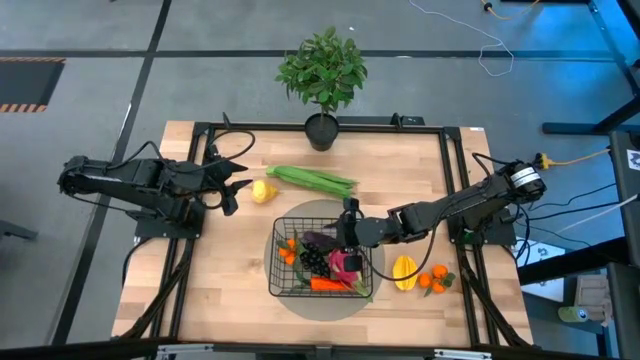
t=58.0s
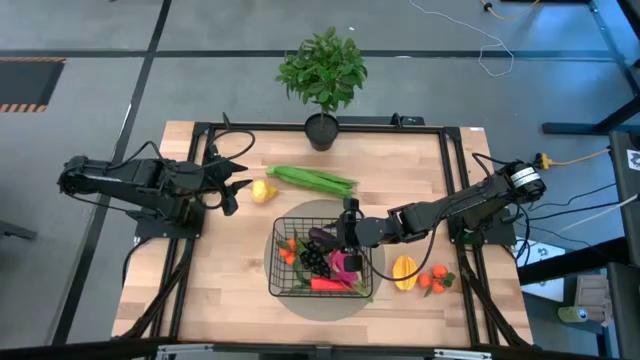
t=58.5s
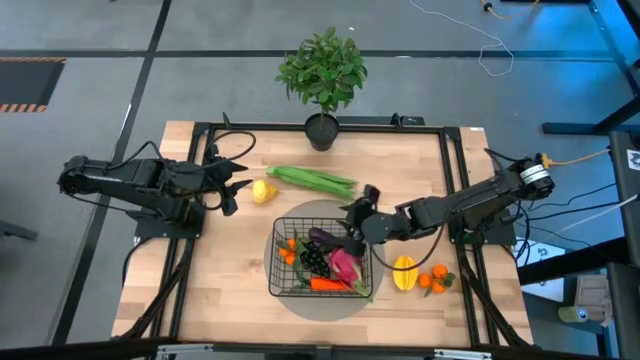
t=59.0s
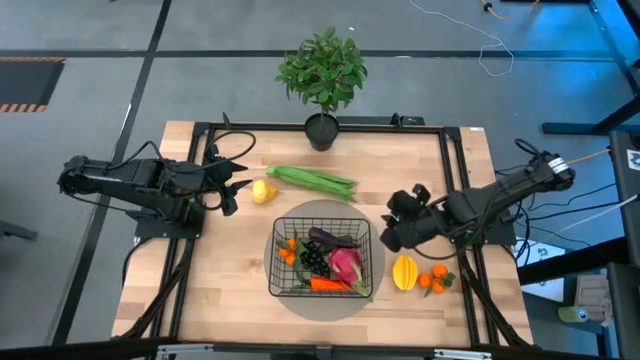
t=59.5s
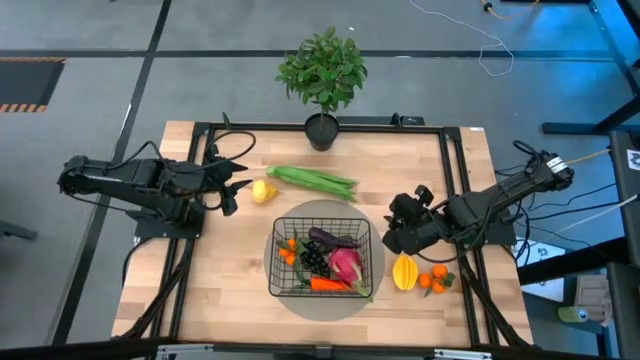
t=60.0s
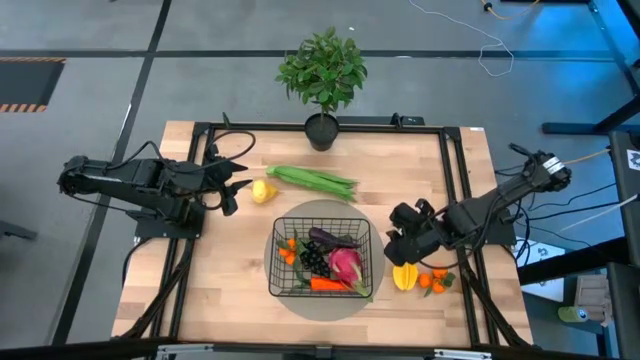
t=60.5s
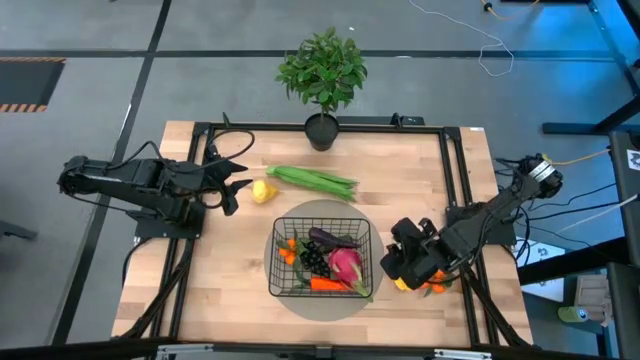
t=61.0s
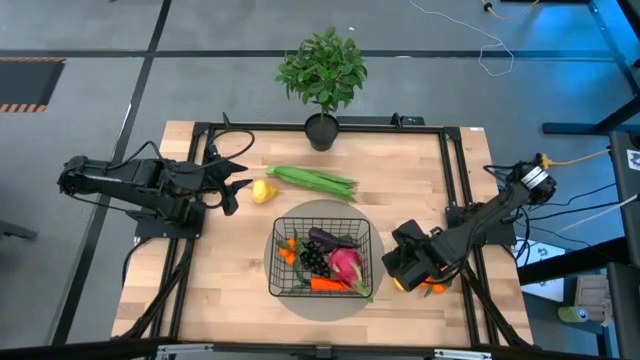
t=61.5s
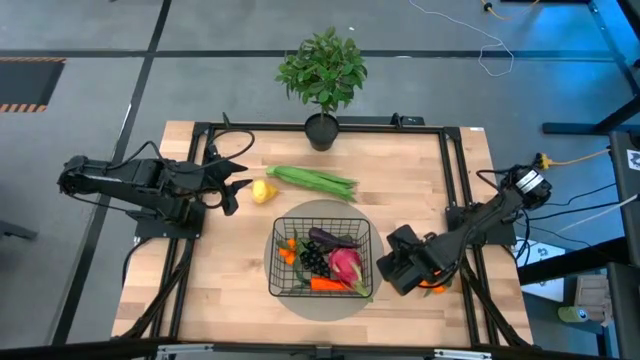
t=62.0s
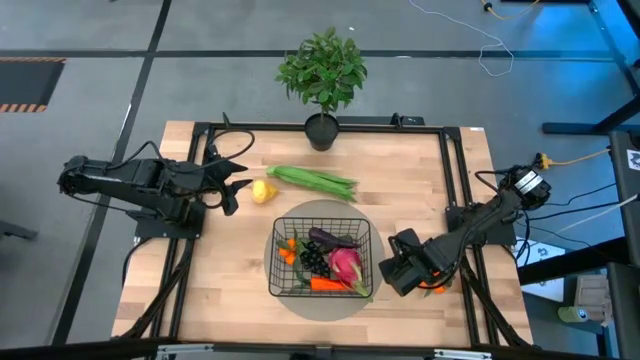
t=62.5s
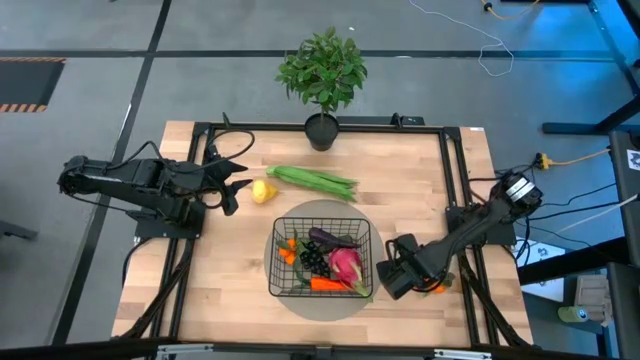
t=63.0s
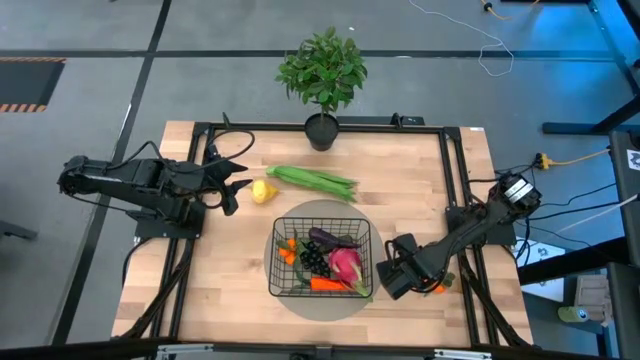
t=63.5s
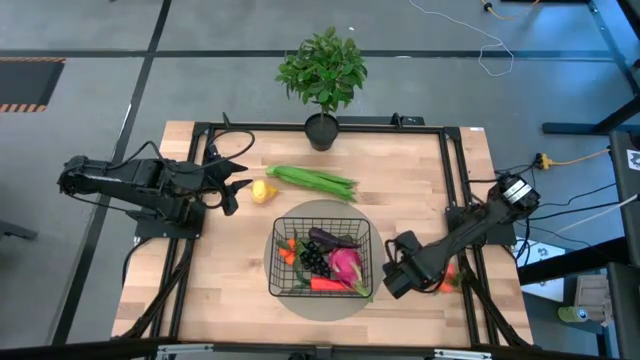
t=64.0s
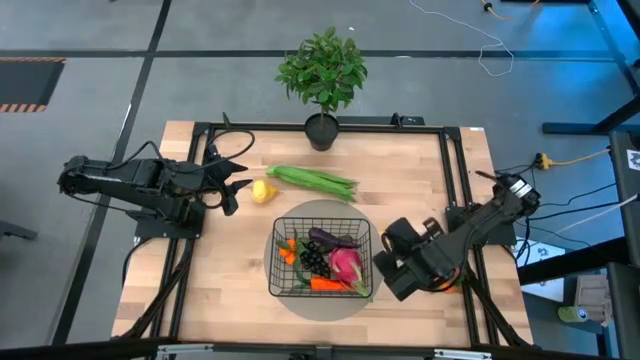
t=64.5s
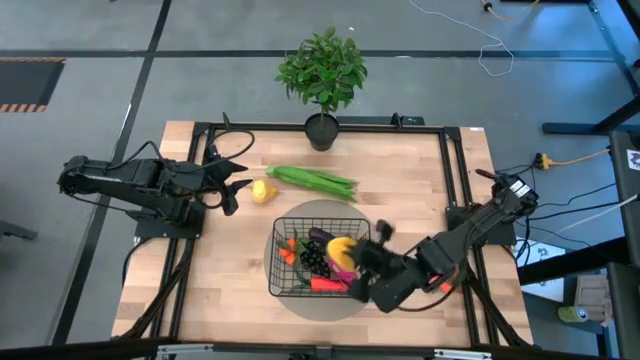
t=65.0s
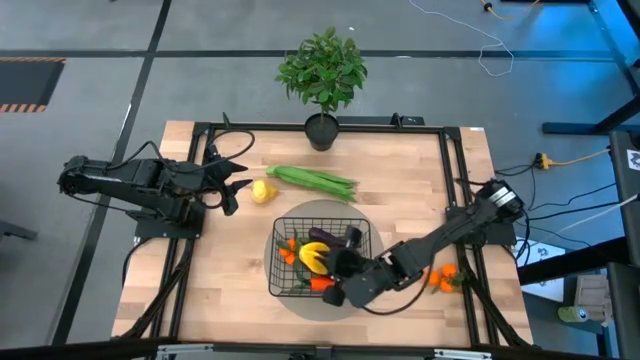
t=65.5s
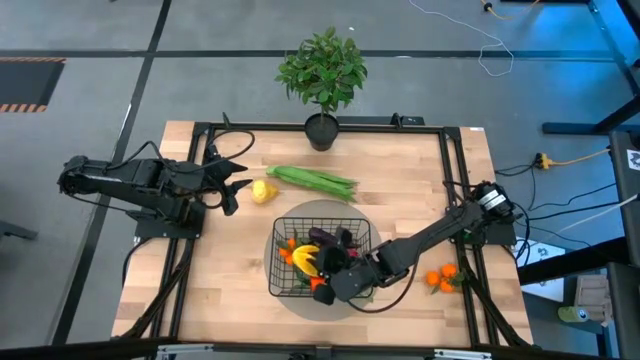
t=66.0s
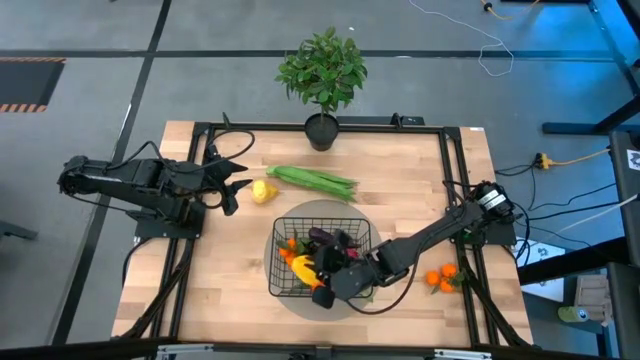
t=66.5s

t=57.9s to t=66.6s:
Task: Build produce basket
Put the starfruit into the black wire basket

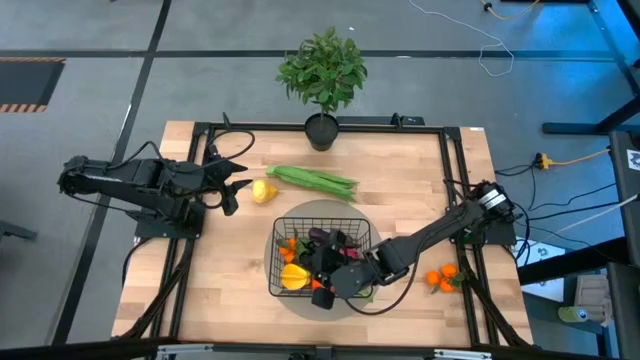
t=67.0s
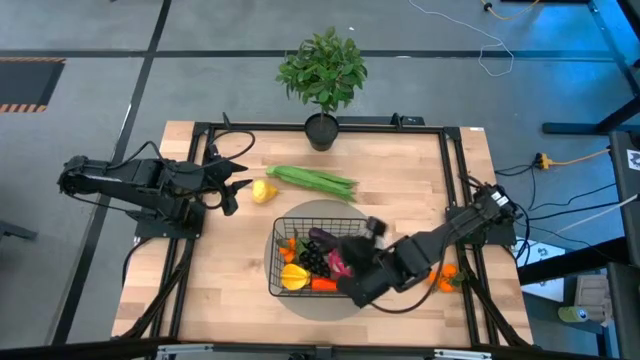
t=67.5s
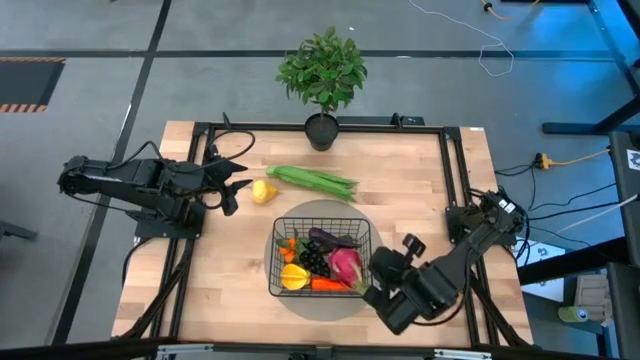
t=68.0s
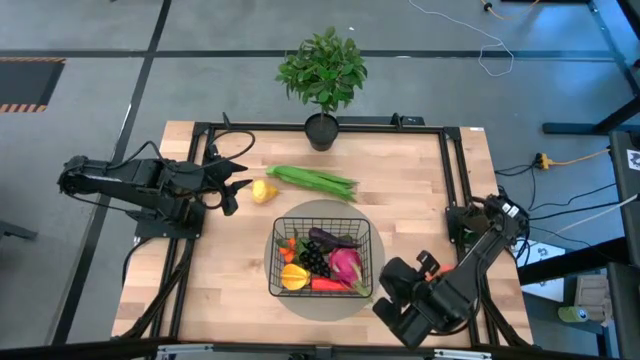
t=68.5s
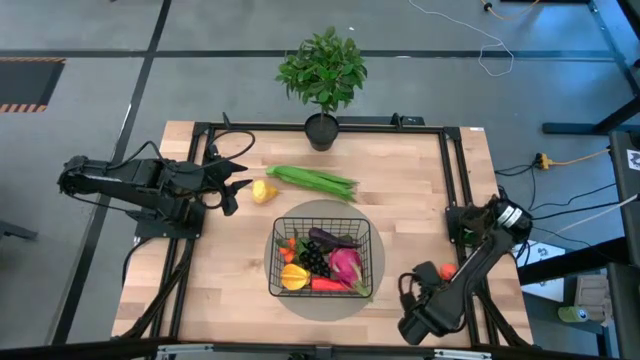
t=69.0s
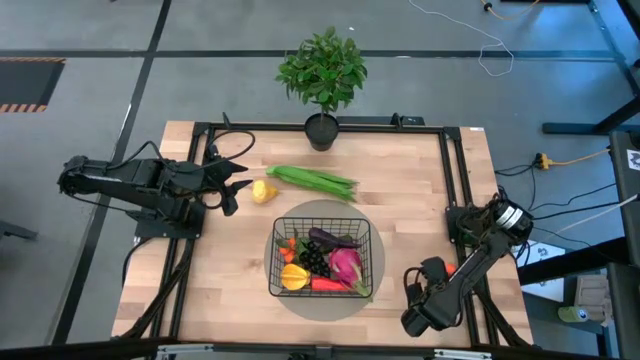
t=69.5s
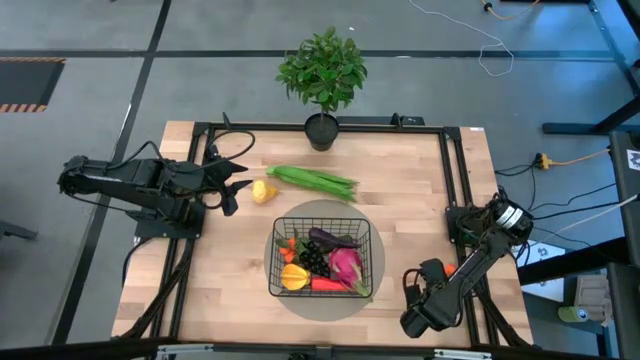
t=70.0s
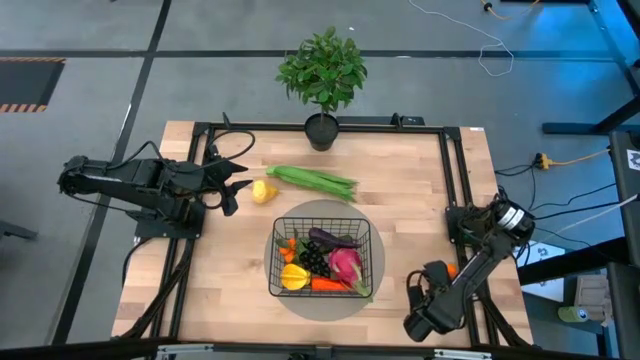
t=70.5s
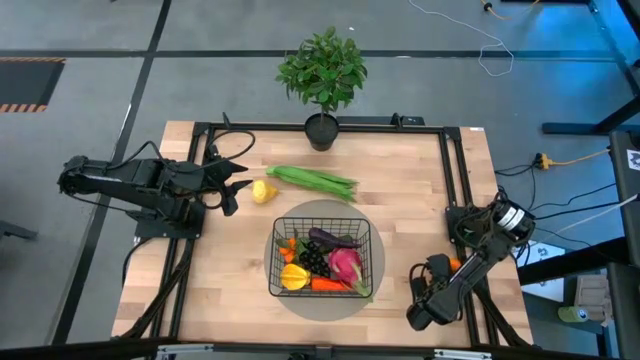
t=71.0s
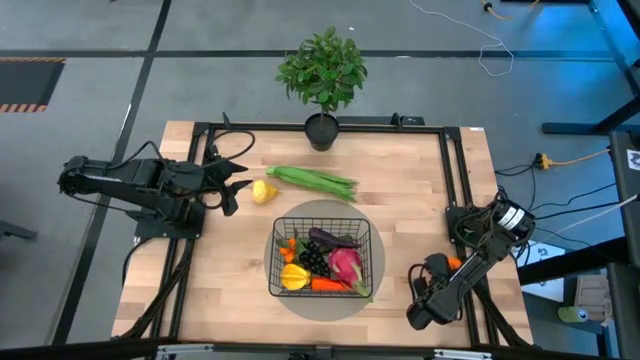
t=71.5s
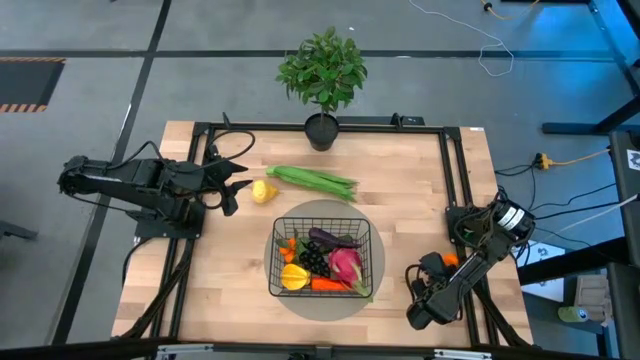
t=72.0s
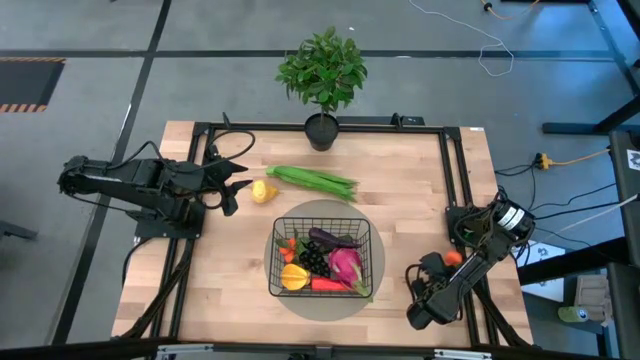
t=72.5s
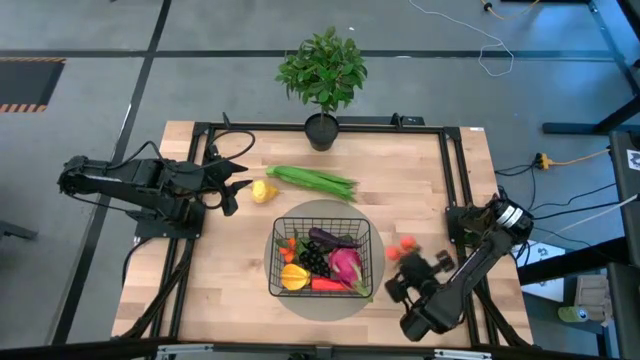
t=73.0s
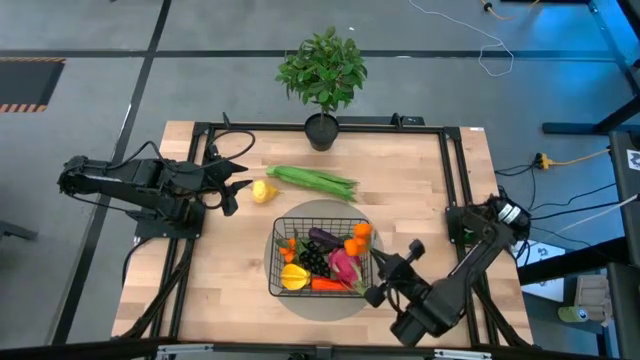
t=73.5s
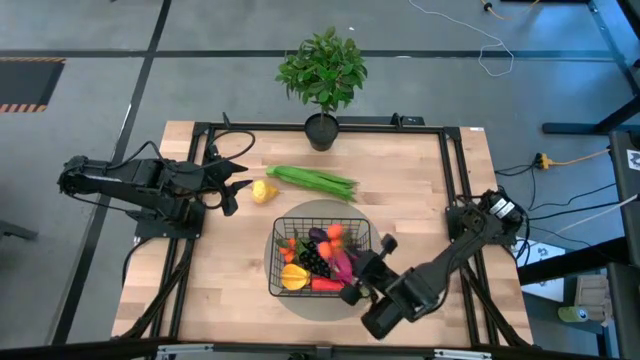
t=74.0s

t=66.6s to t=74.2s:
Put the tangerines into the black wire basket

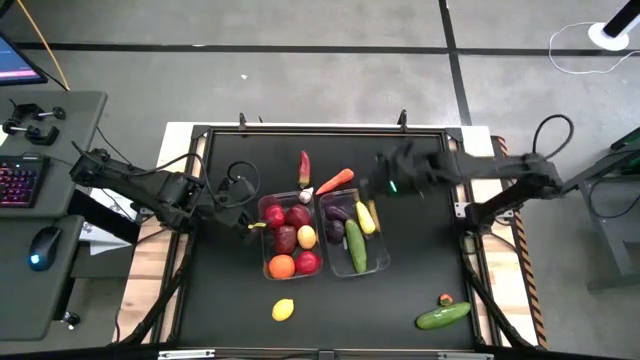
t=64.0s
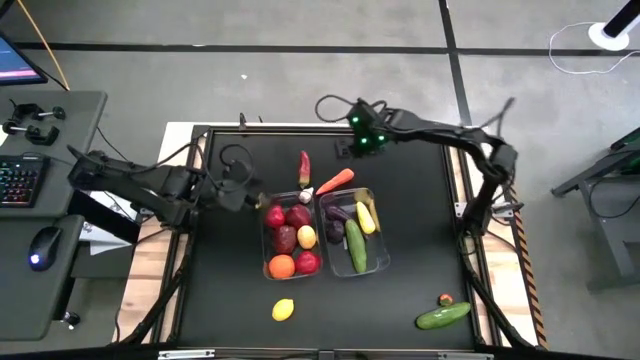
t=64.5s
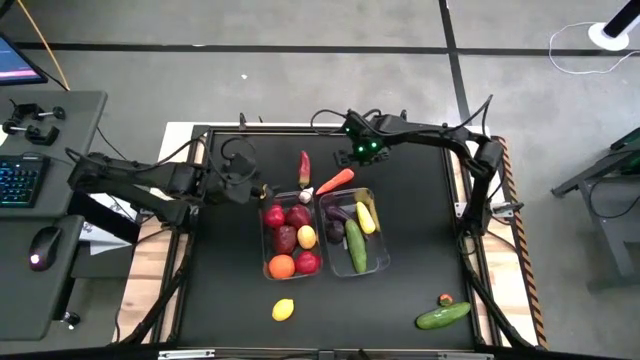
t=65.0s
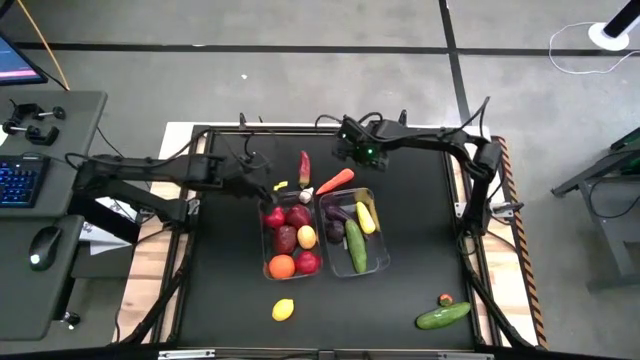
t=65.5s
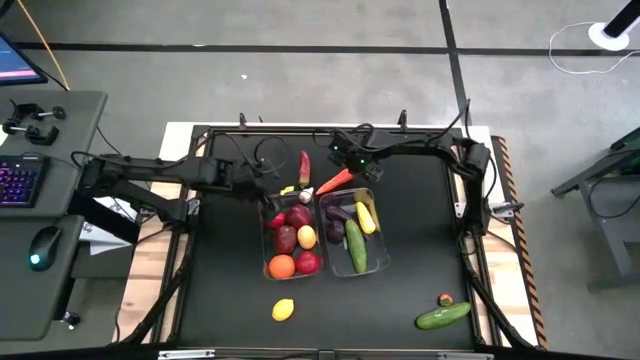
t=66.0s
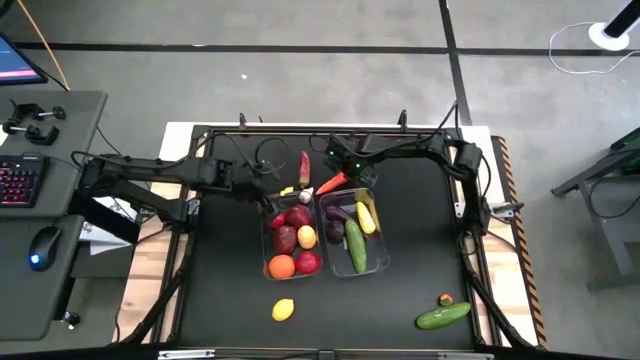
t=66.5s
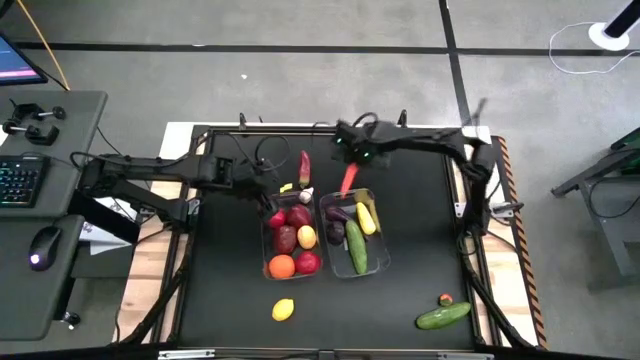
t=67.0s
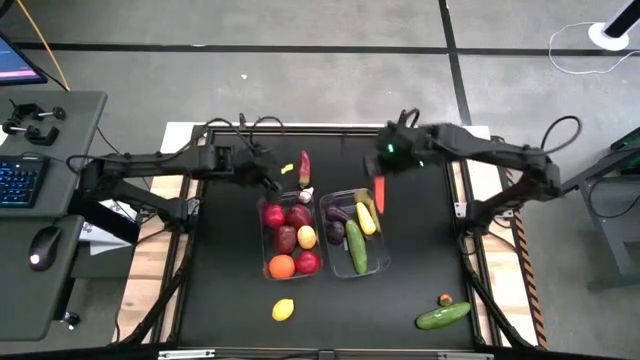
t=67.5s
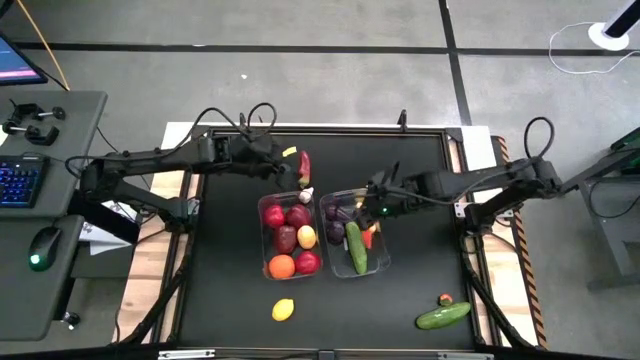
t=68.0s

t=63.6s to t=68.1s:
Task: Sort produce into baskets
Put the carrot into the right transparent bin

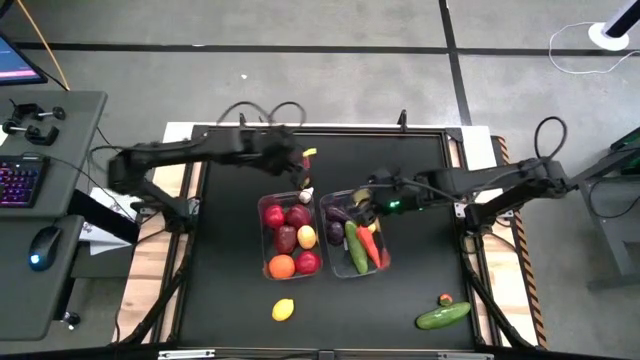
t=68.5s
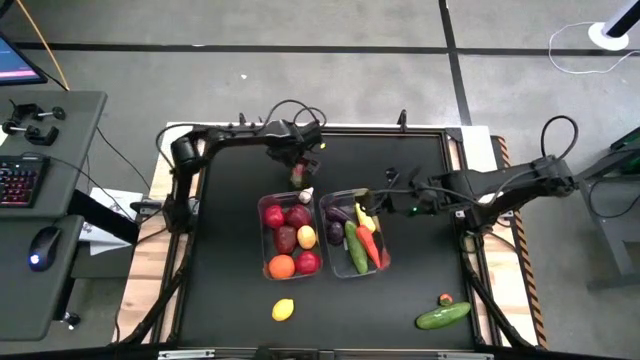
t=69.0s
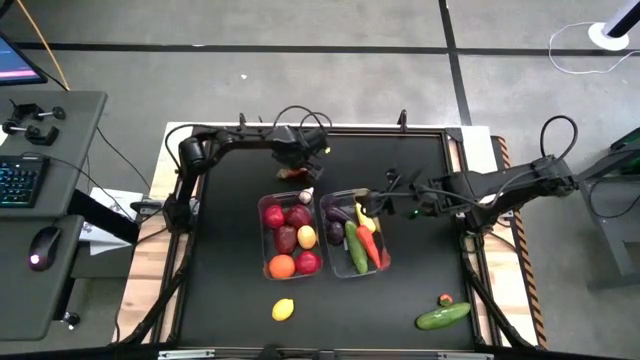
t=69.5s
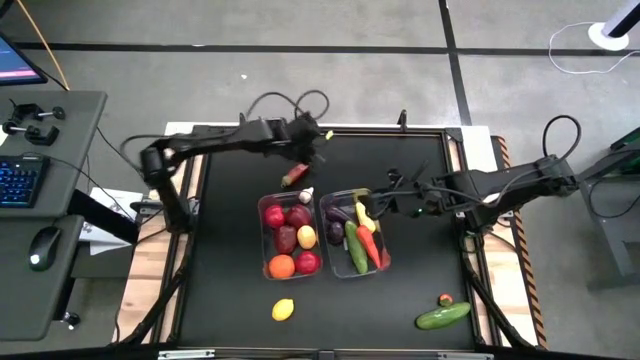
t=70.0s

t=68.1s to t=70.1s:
Put the chili pepper into the right transparent bin
